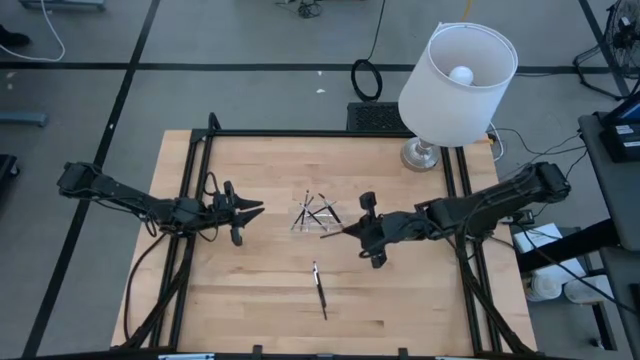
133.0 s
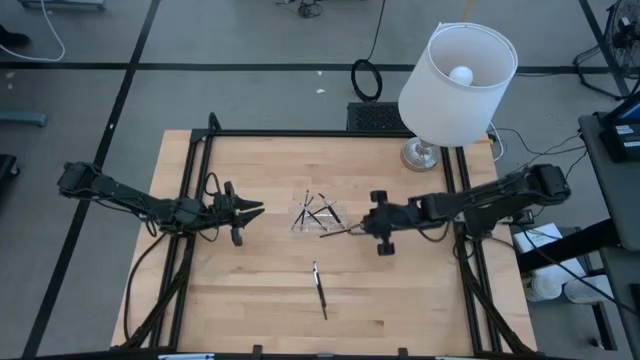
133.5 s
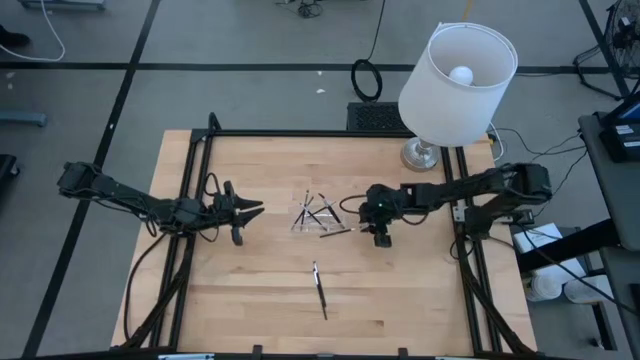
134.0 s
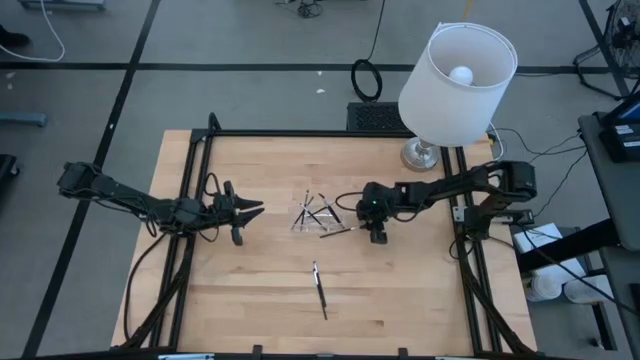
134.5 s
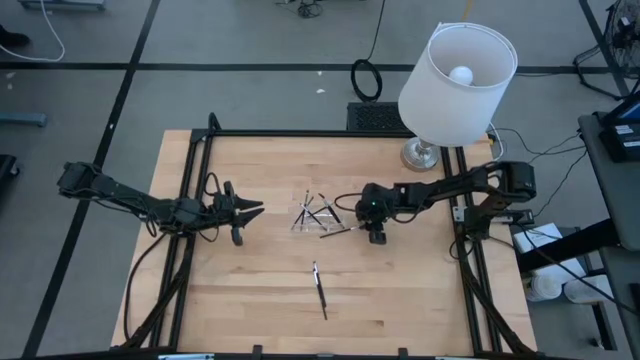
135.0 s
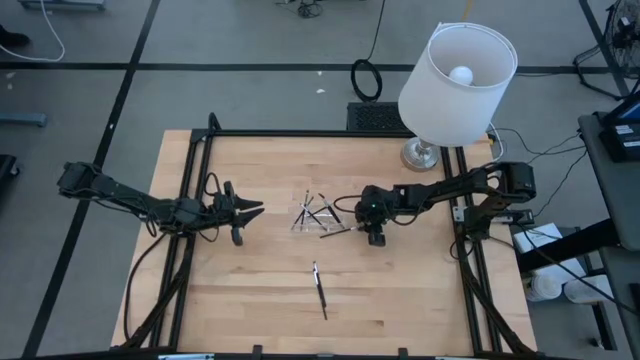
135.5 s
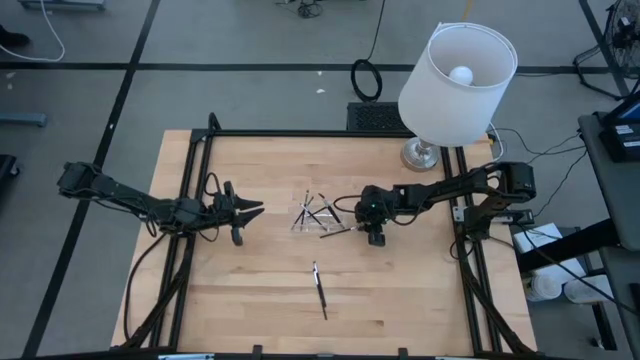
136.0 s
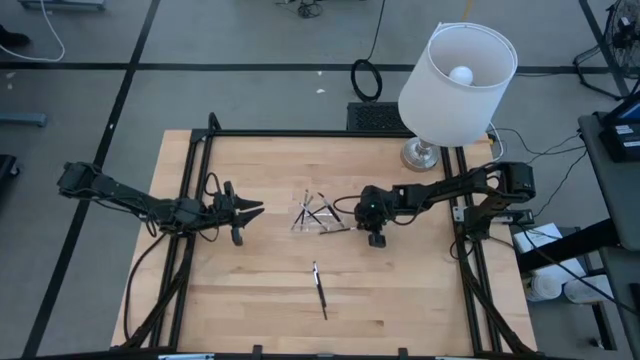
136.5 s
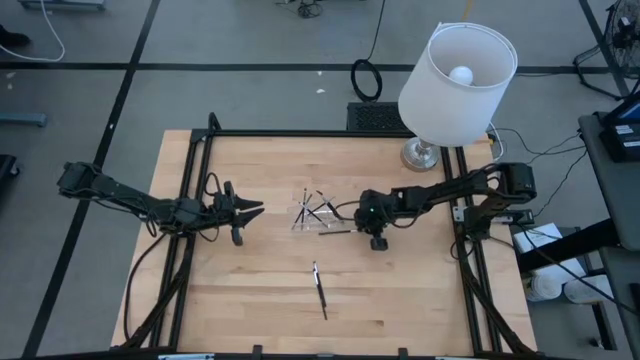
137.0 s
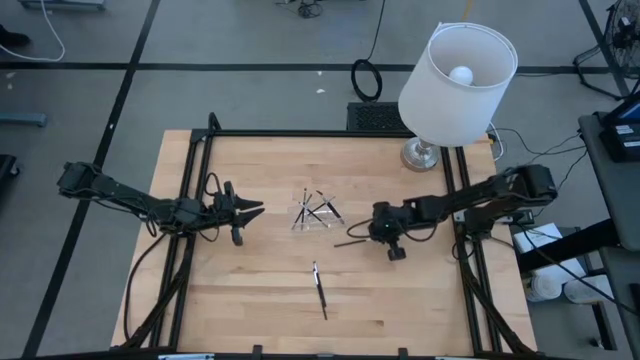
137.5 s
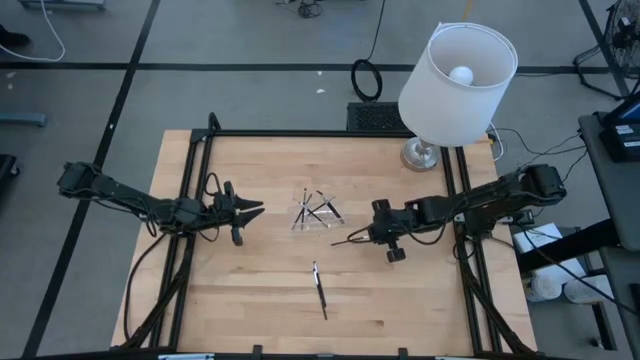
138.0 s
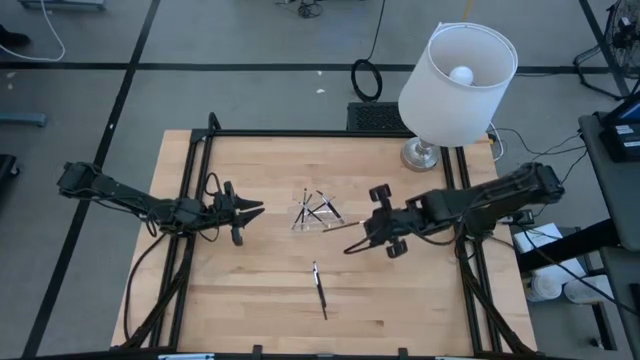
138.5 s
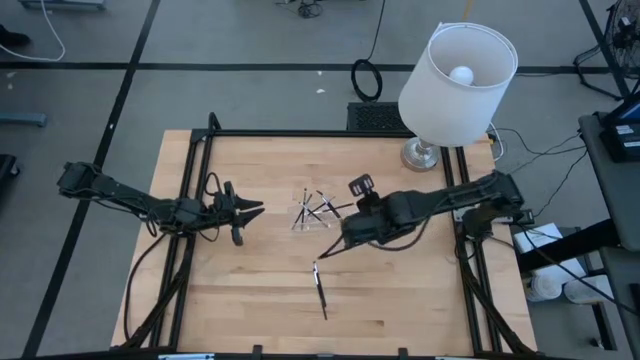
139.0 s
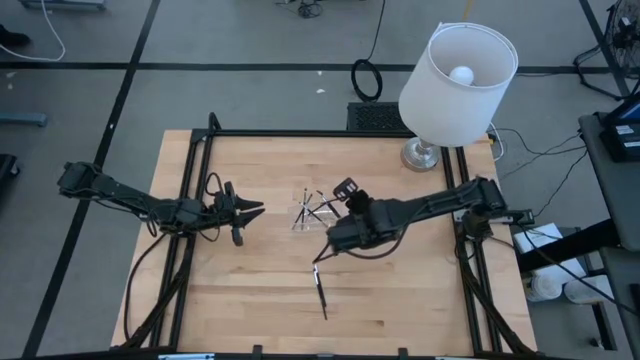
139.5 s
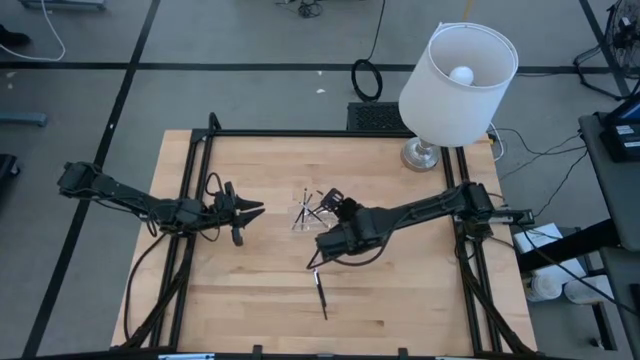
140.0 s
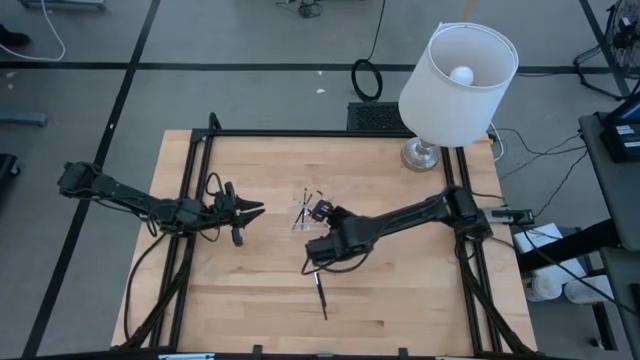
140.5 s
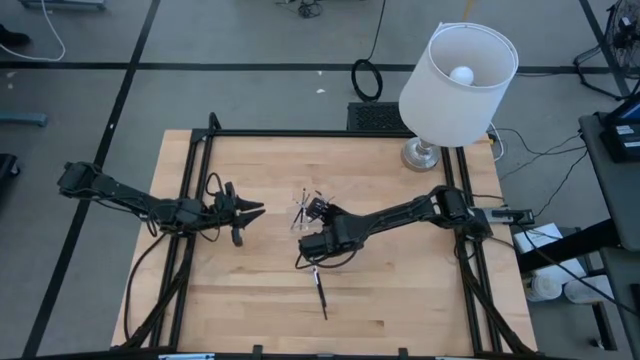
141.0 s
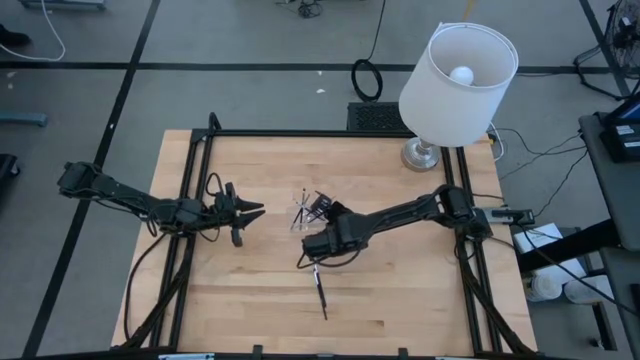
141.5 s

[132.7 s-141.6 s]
Task: Pick & Place Makeup Supplies
Put the makeup brush into the transparent organizer

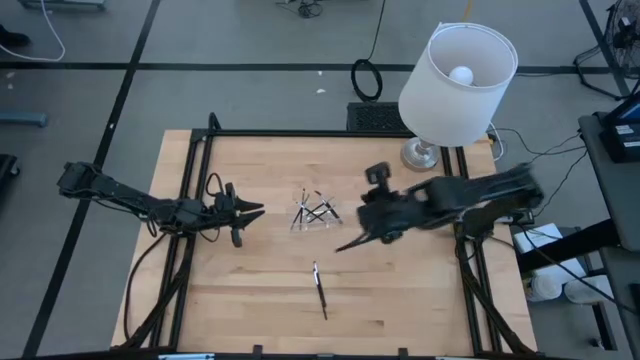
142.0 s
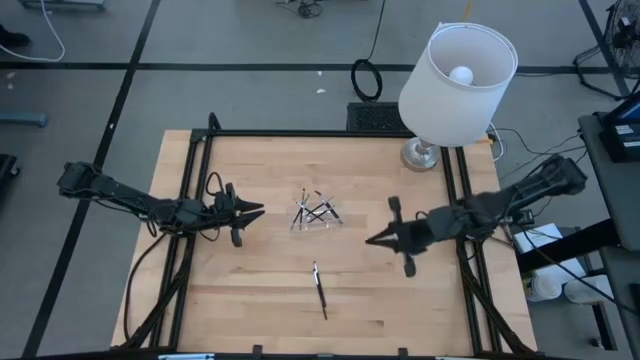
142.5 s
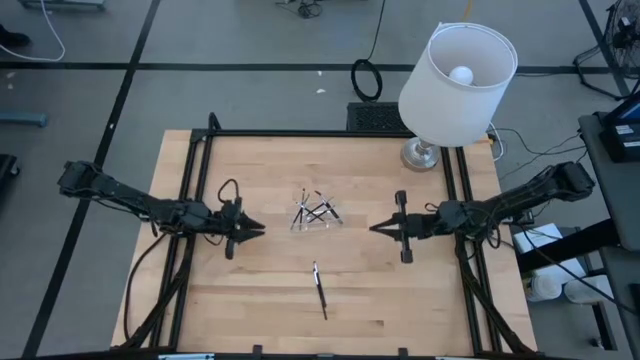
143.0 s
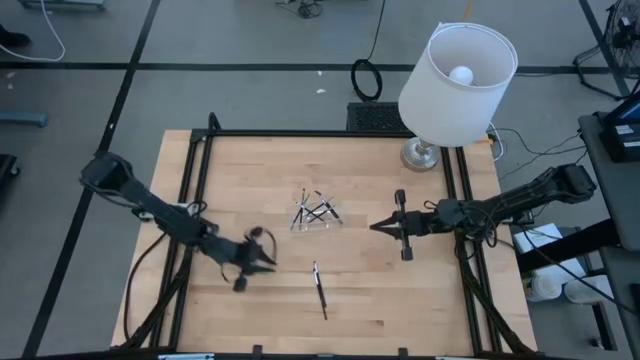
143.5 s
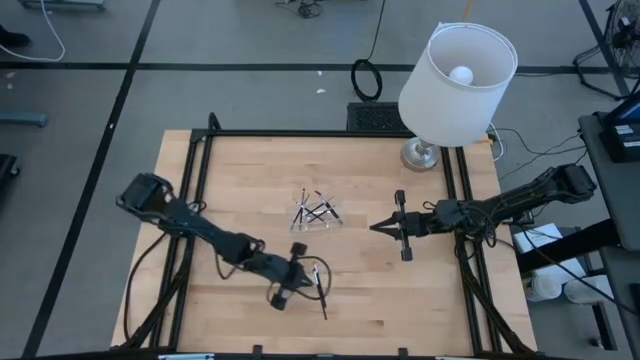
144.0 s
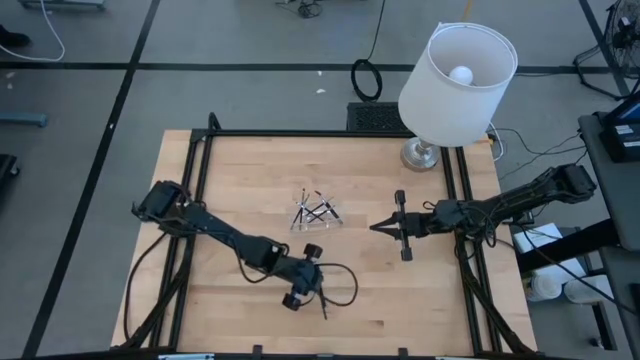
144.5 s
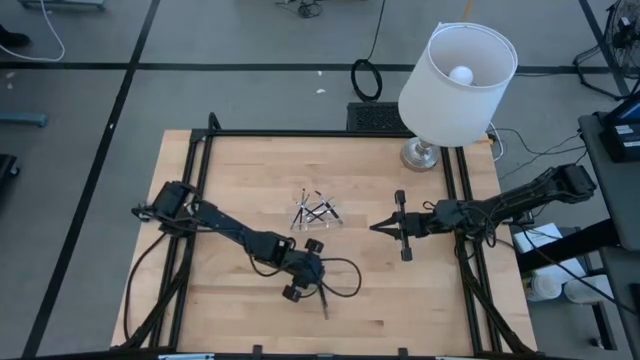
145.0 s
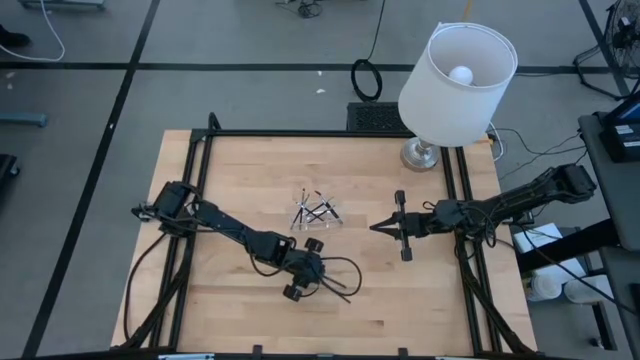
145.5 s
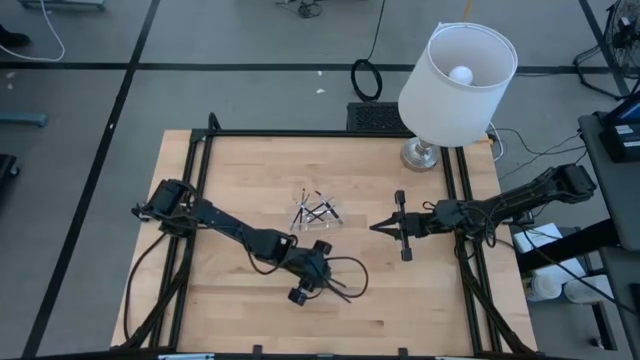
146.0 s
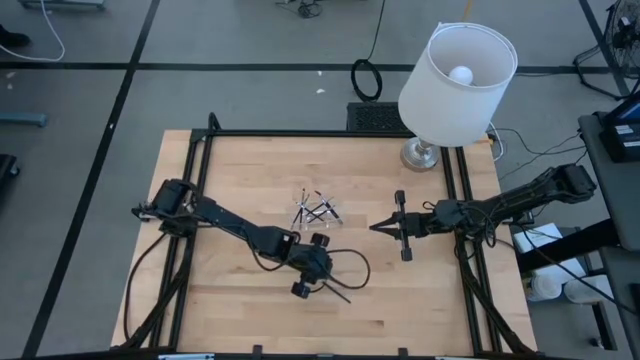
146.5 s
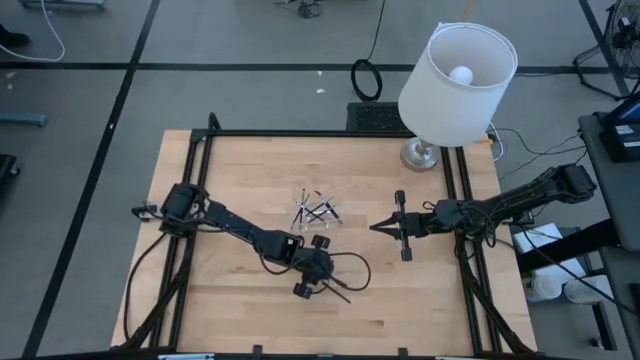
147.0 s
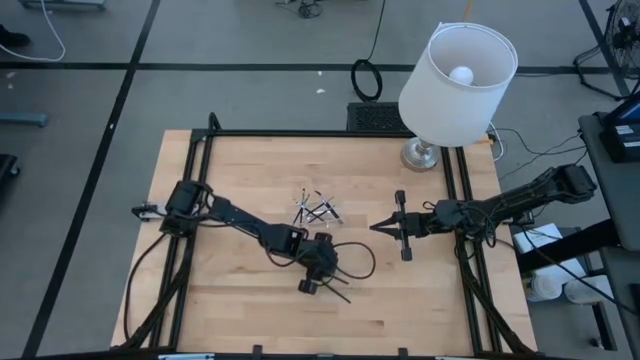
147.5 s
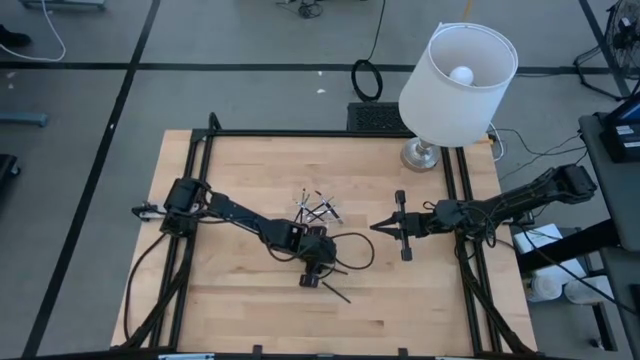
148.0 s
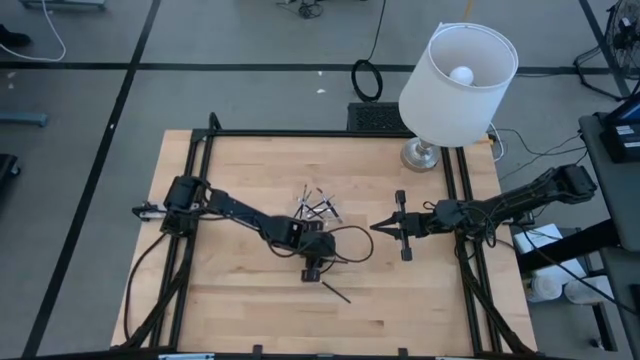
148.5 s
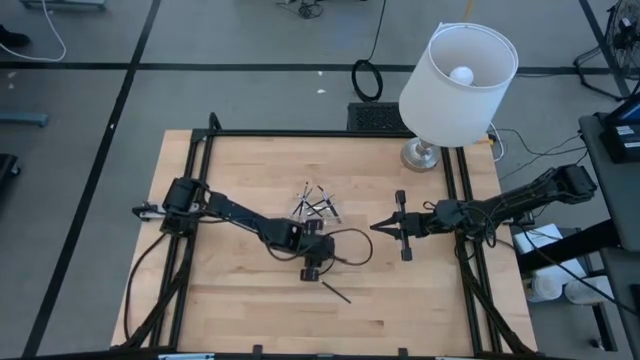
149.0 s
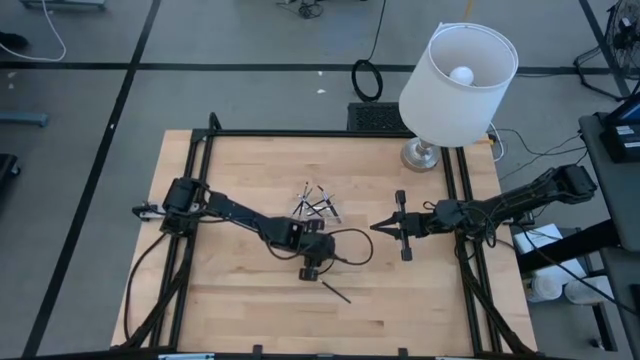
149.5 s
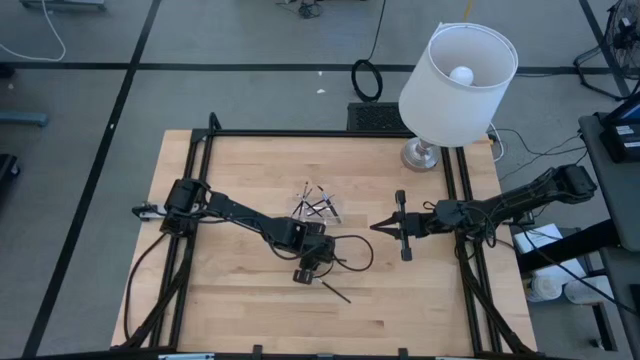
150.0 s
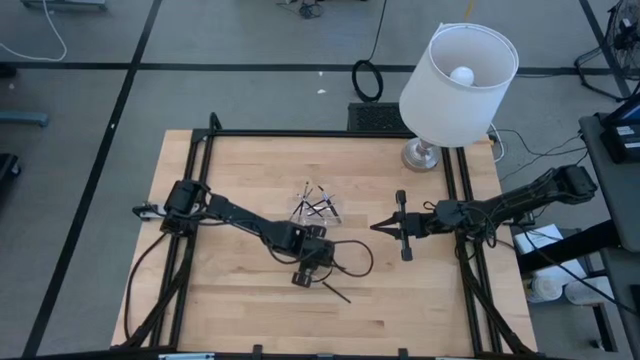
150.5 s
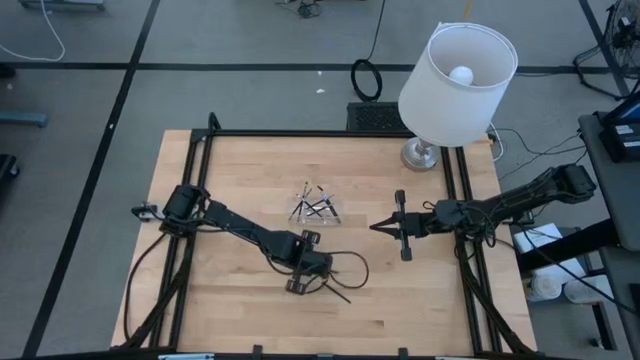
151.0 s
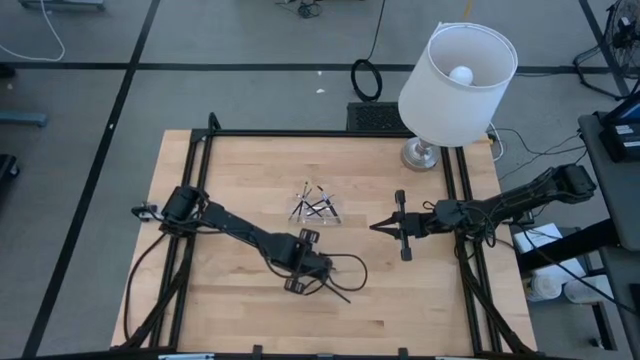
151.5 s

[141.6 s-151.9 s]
Put the makeup brush into the transparent organizer

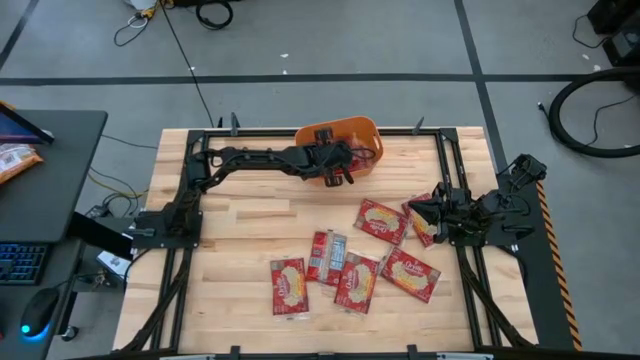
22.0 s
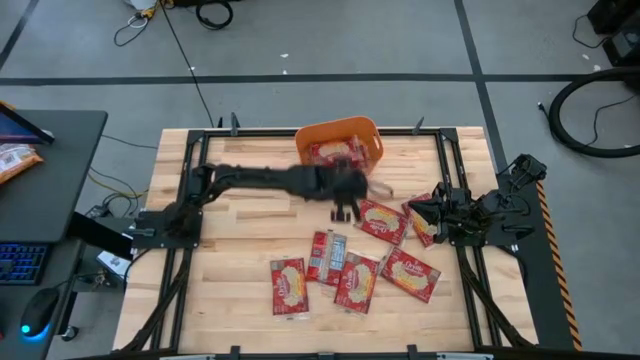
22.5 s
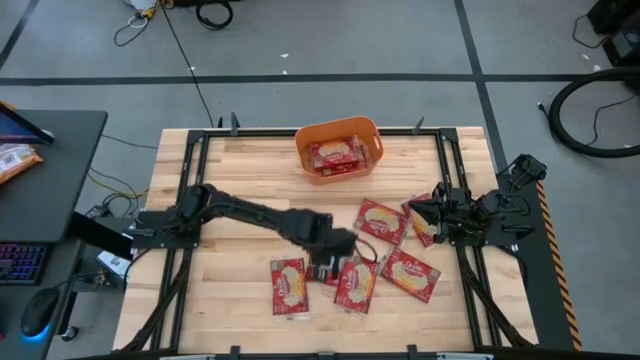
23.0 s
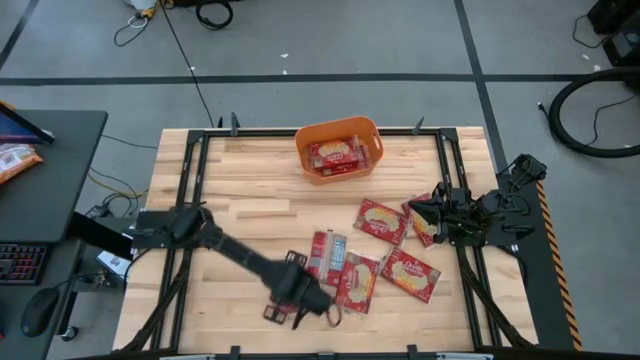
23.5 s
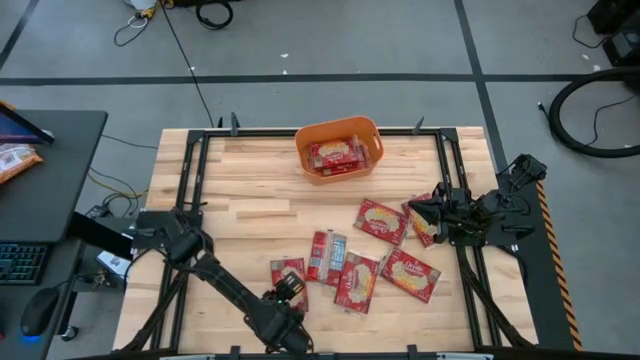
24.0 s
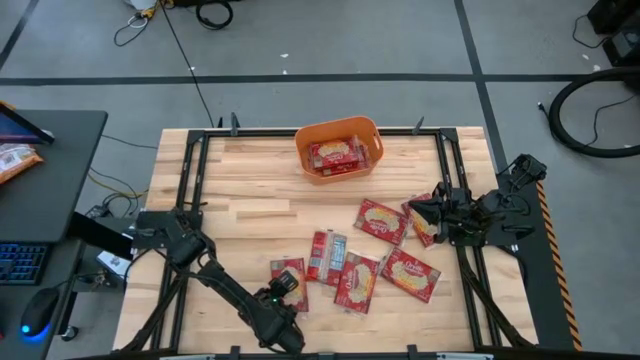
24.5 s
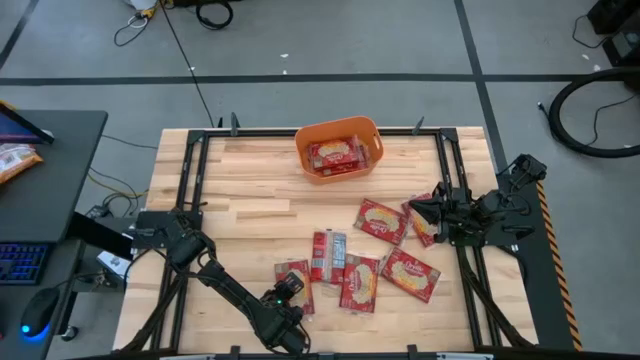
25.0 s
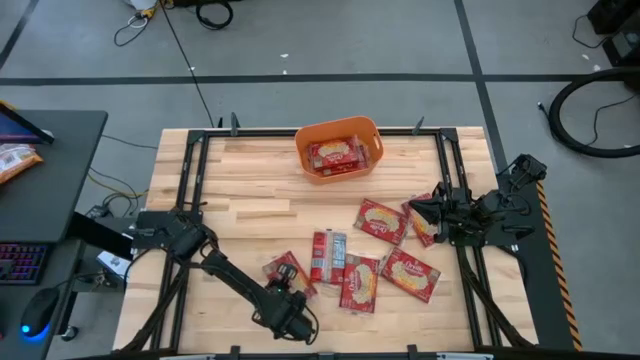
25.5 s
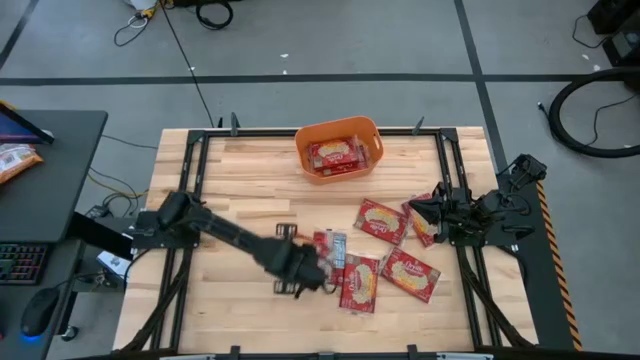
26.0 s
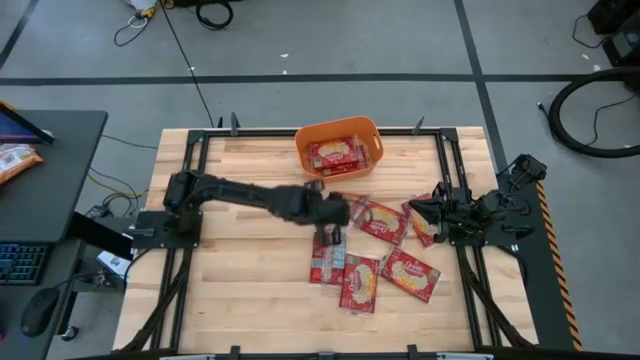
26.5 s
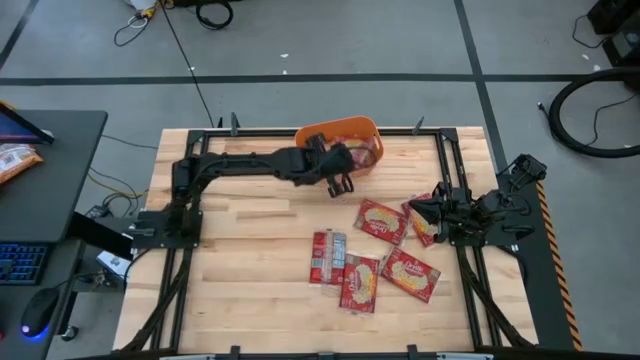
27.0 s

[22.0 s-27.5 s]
Task: Sort popcorn bags into baskets
Stack the popcorn bag on top of the stacked popcorn bag into the bin
